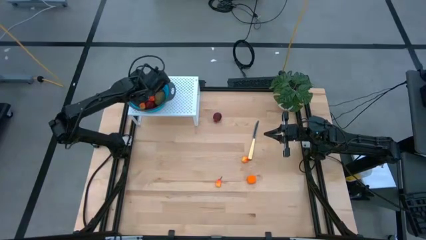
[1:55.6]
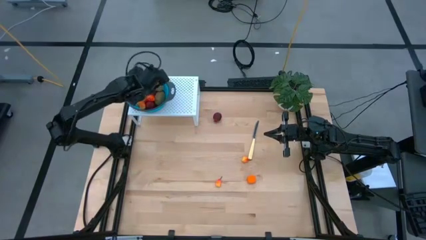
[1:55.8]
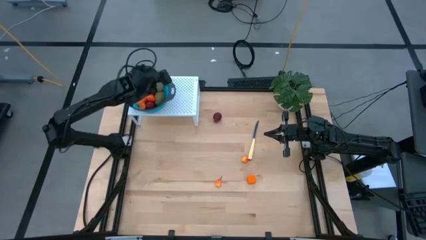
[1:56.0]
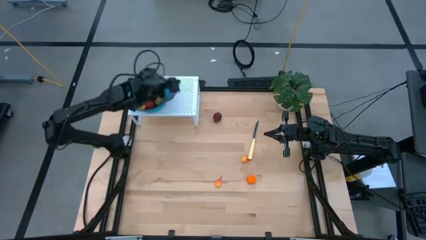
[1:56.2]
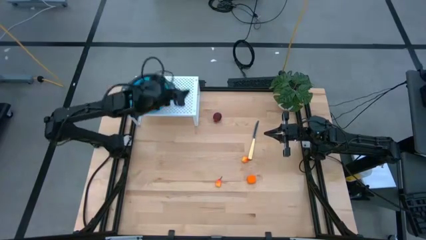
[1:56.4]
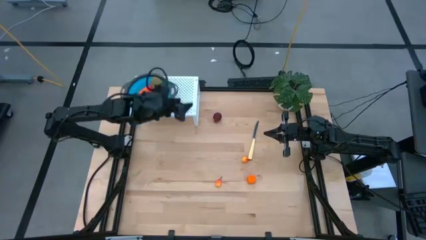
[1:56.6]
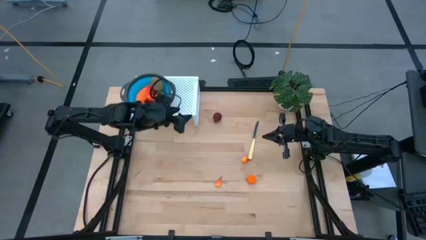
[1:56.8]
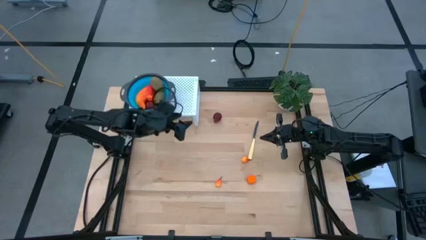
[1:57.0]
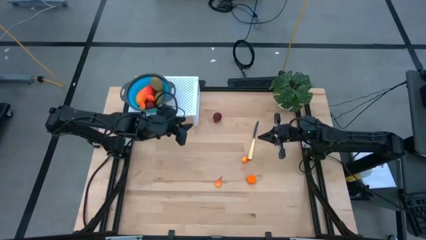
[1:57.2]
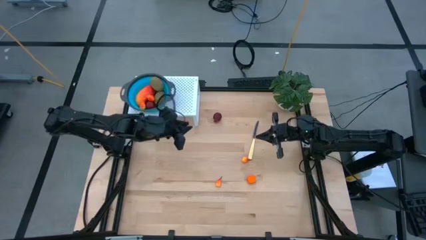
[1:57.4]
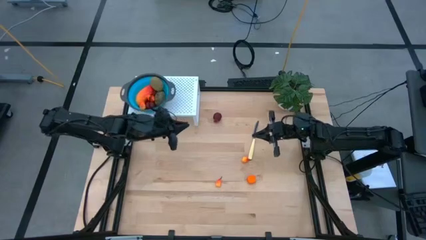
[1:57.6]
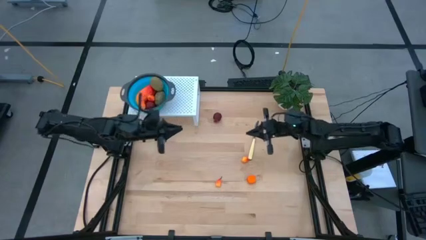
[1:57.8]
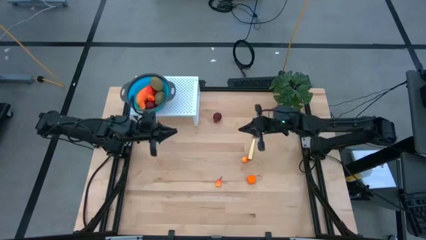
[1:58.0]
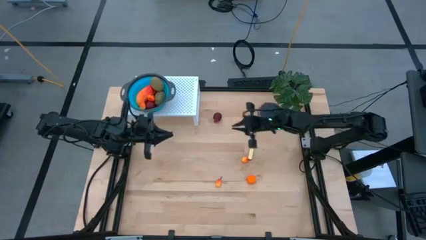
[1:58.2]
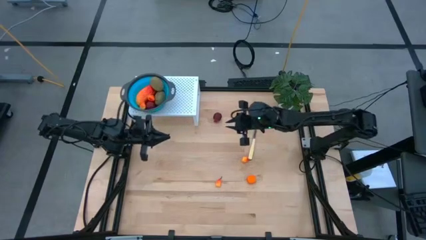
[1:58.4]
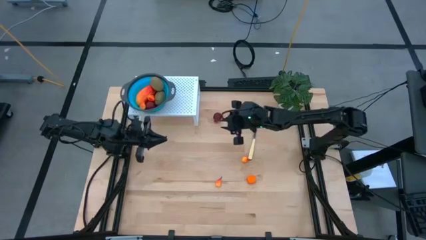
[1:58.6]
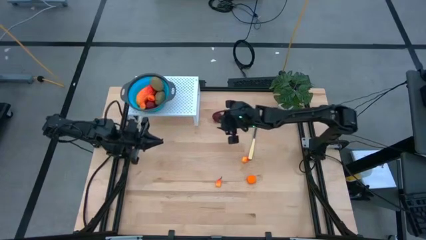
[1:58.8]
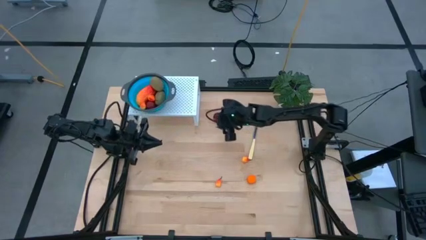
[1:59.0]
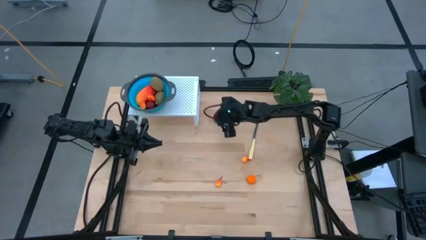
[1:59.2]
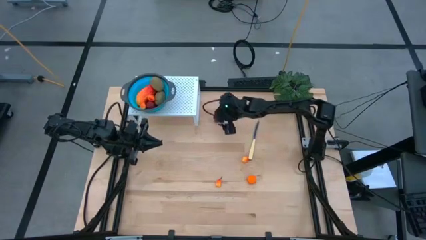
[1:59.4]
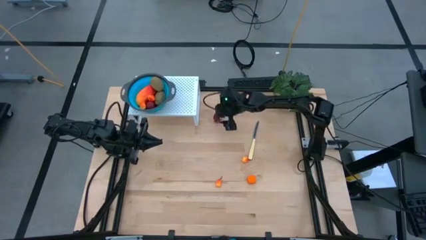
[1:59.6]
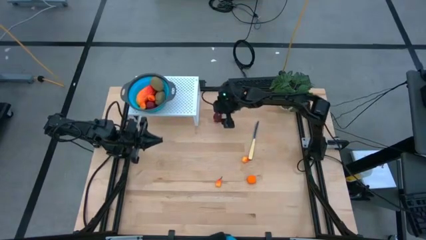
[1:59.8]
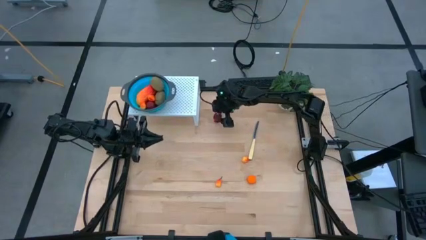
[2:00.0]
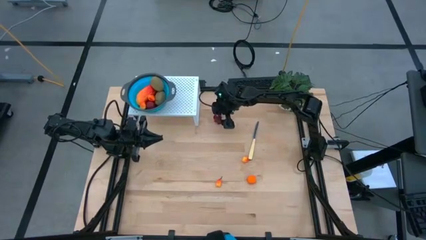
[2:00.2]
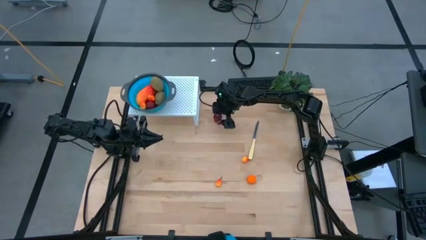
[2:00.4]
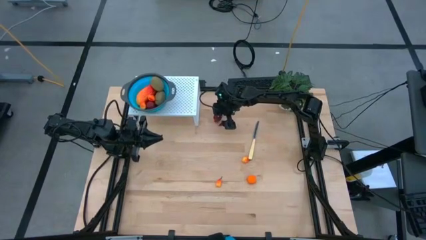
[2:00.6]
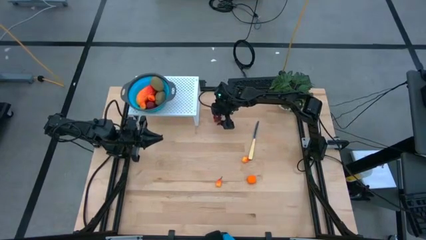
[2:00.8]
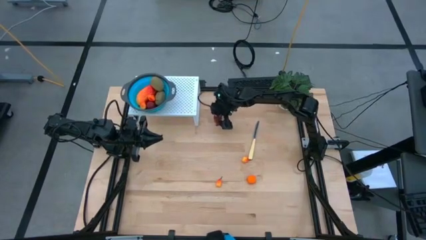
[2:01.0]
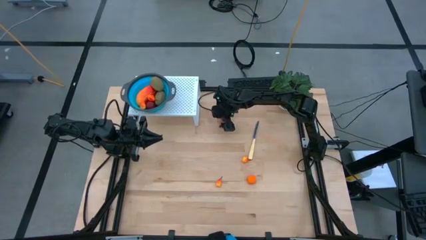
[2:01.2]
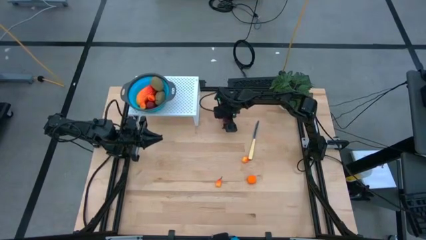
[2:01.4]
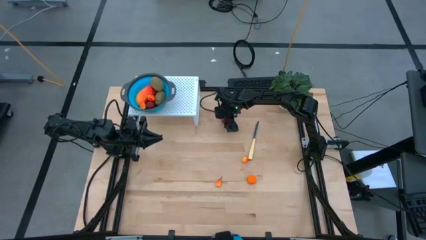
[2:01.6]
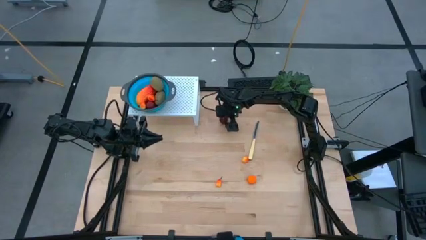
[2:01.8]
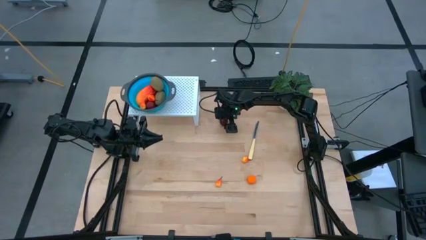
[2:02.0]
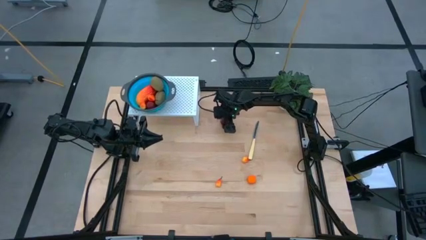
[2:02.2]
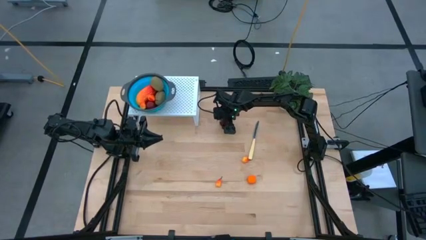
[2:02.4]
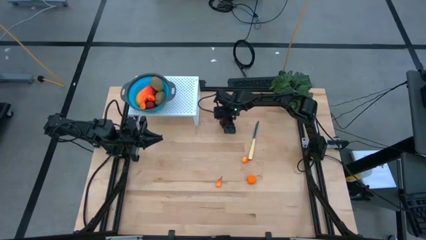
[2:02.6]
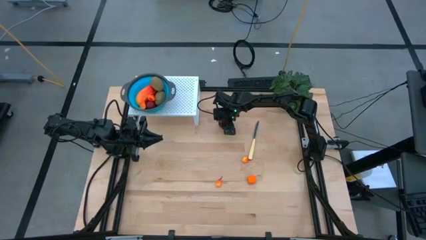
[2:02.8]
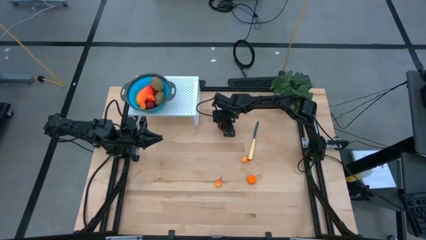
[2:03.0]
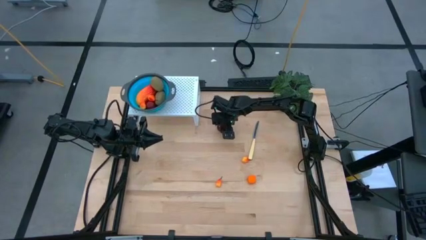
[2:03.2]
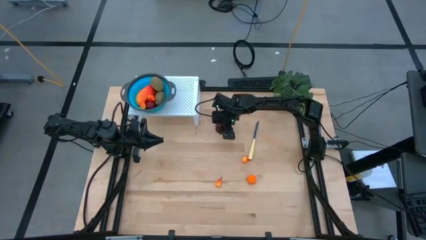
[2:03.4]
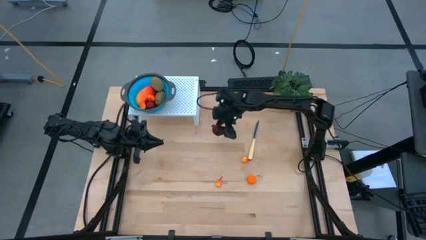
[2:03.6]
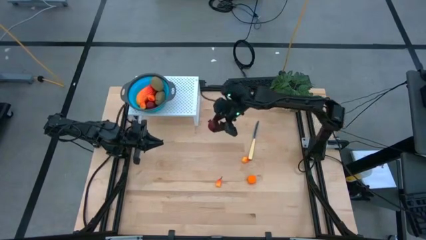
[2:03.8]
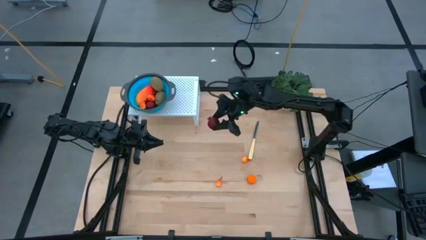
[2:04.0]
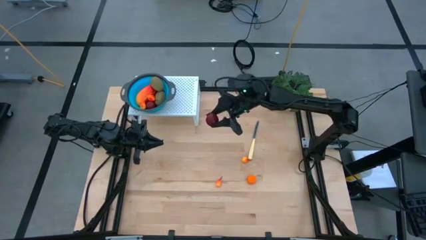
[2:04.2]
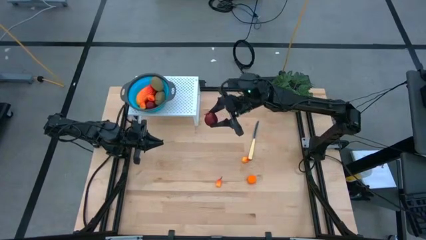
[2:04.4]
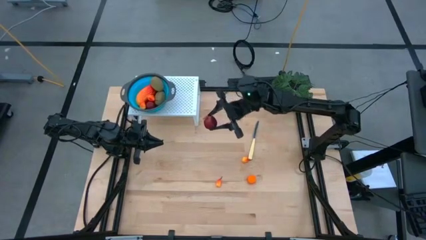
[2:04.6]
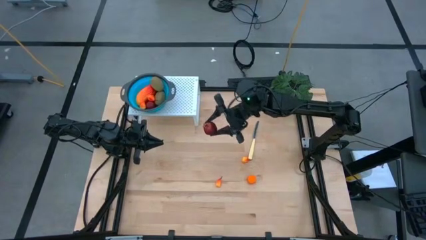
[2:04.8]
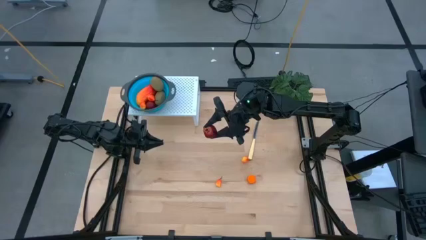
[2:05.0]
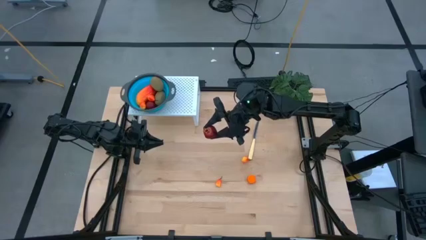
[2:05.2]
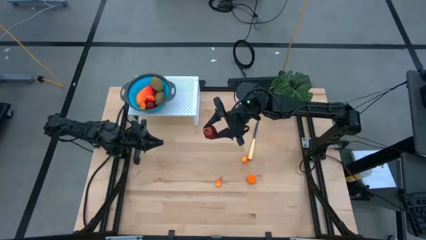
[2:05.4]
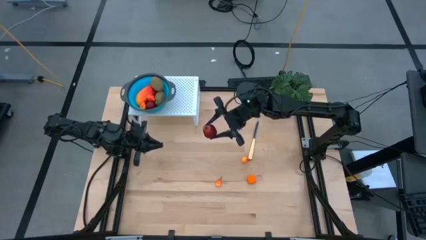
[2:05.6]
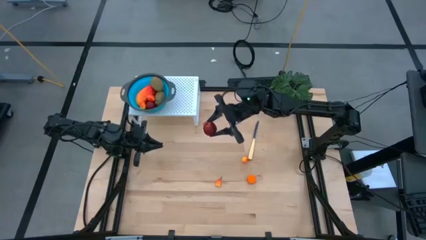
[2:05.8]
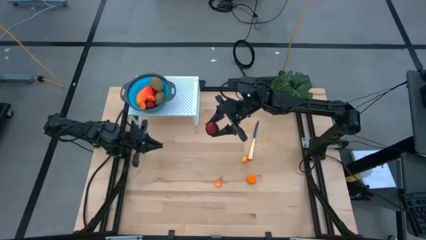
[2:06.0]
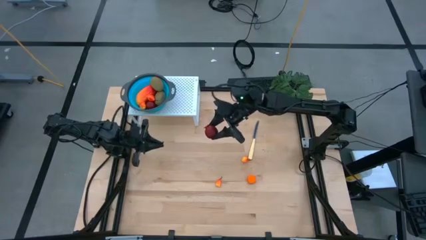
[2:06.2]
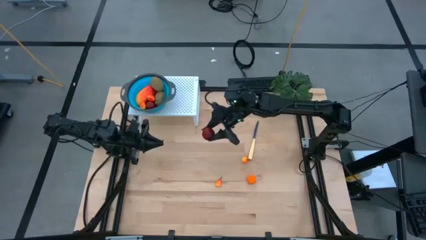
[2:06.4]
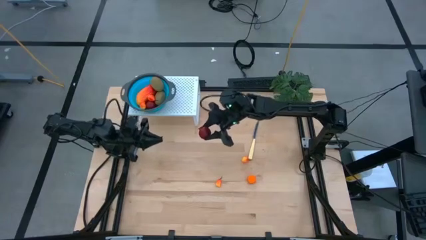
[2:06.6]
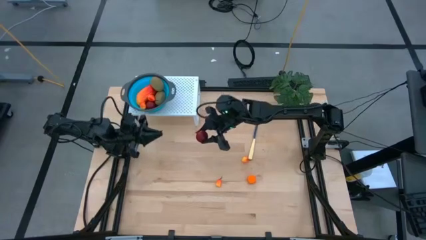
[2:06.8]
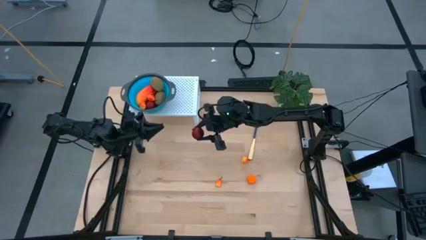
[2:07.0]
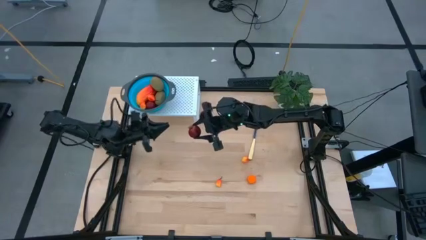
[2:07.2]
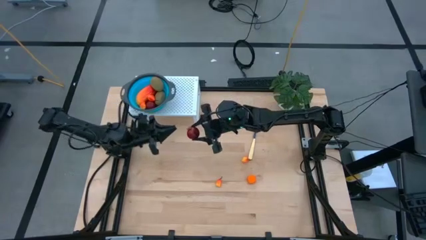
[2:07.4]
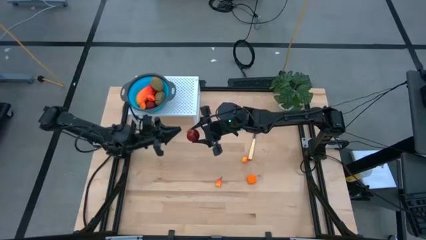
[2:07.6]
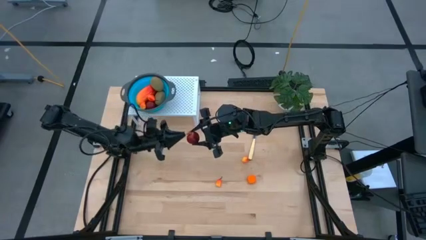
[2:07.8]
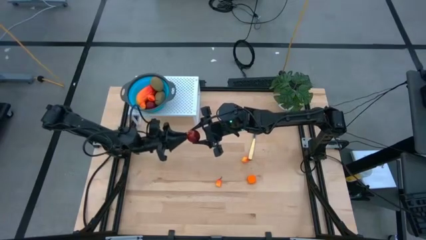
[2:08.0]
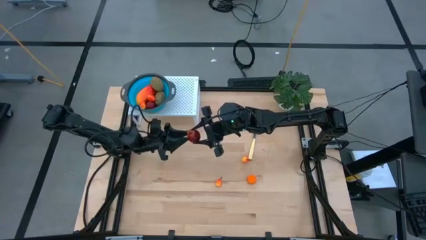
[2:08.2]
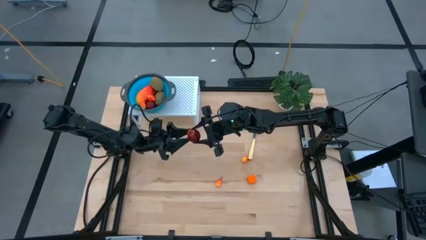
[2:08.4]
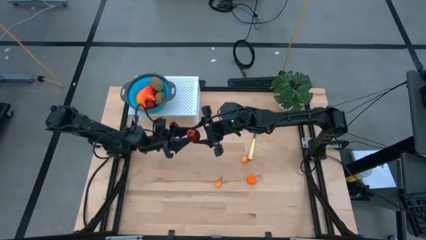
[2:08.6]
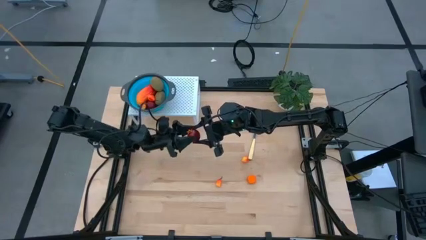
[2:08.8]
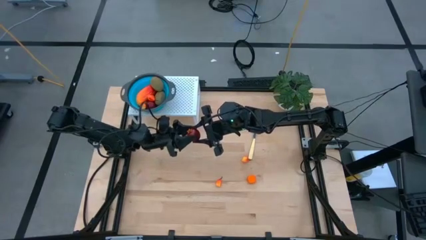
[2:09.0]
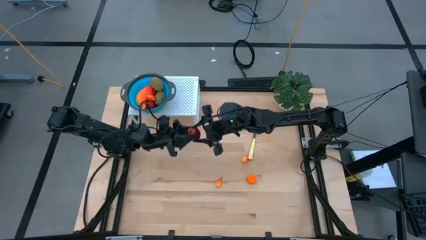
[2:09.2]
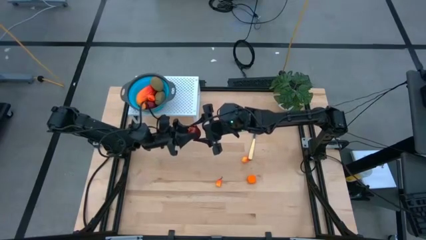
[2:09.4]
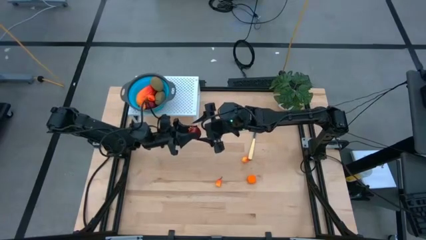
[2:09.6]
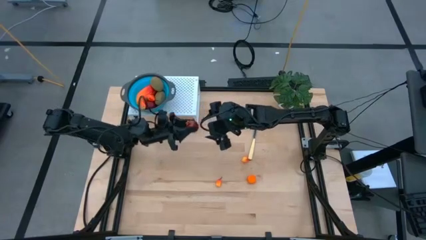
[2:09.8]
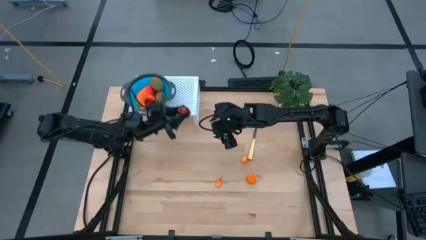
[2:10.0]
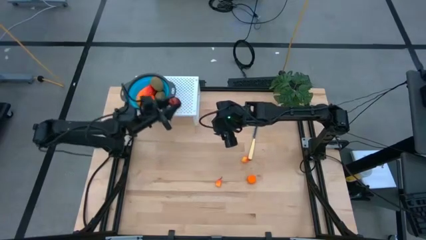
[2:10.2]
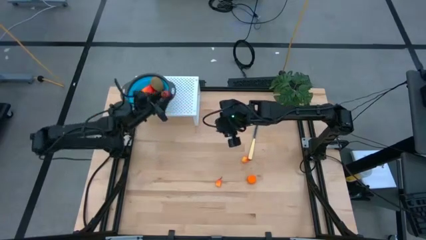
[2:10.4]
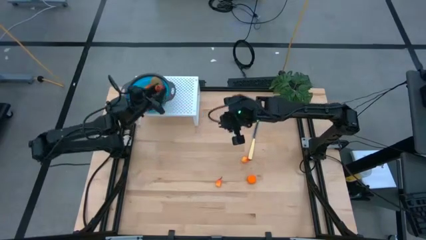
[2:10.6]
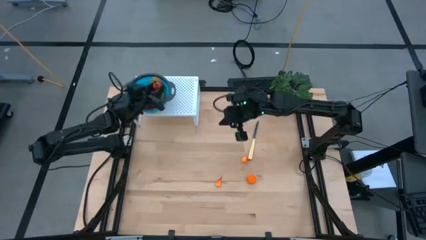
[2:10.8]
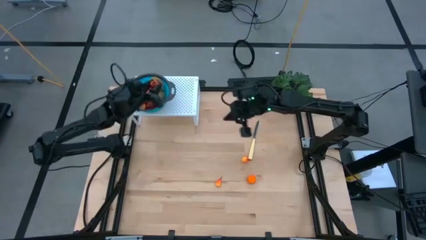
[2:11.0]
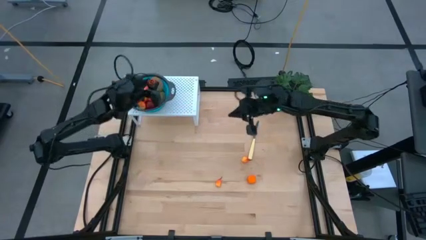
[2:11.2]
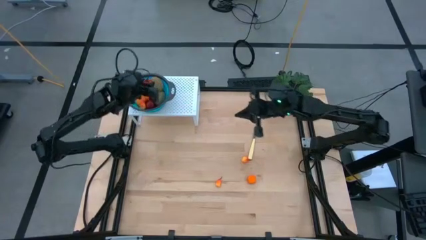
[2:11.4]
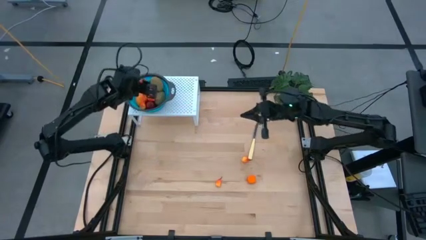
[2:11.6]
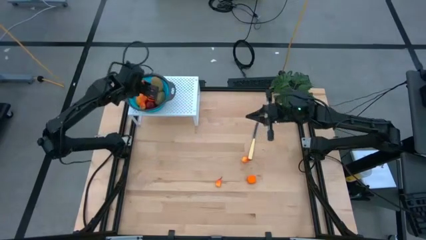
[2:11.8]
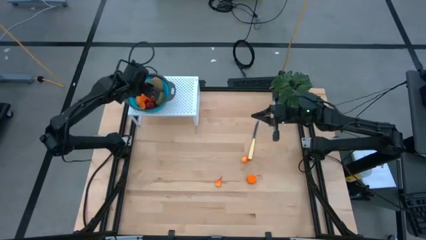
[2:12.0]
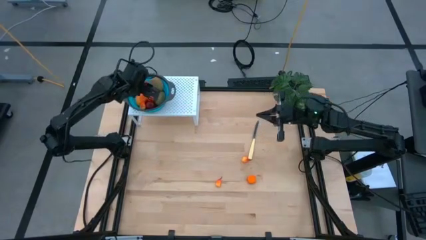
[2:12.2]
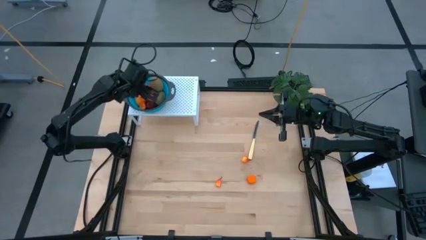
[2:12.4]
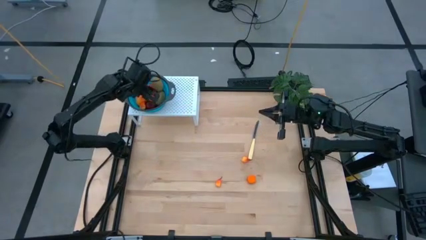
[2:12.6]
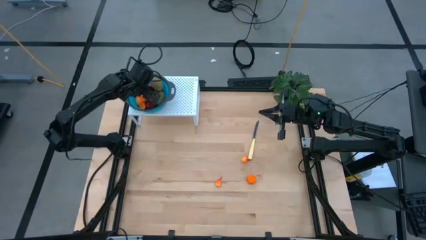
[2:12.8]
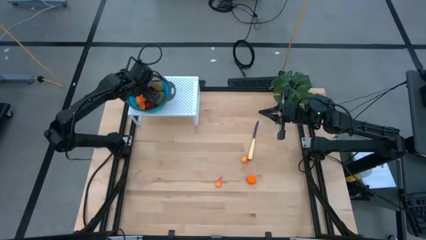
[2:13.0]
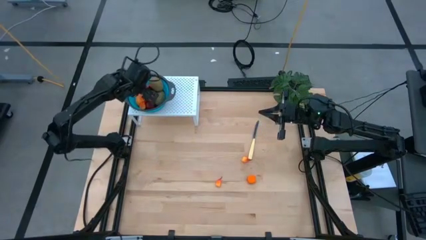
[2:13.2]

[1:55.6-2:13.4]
Task: Pick & Place Fruit
Put the red pomegranate into the blue strainer bowl on the shelf
